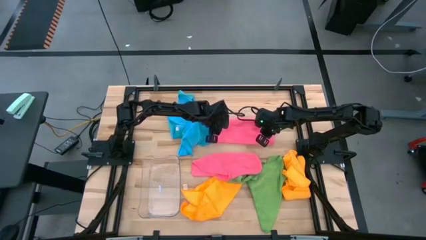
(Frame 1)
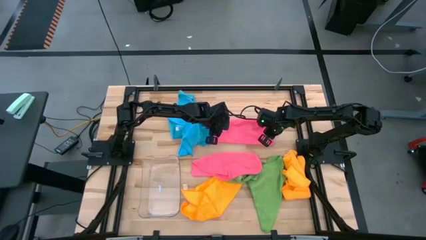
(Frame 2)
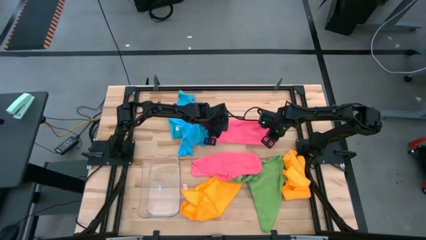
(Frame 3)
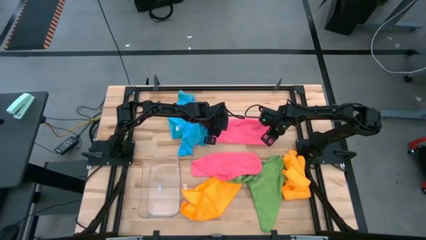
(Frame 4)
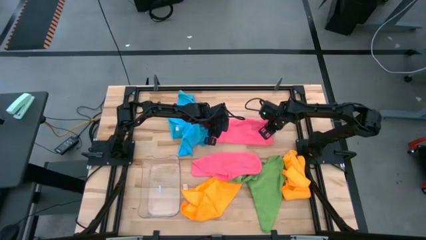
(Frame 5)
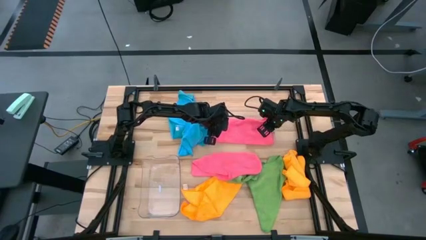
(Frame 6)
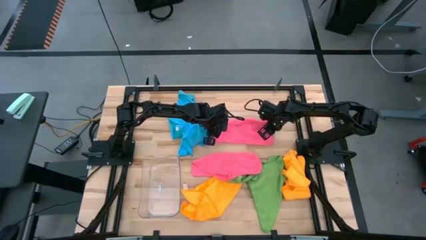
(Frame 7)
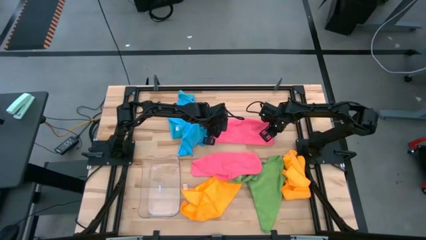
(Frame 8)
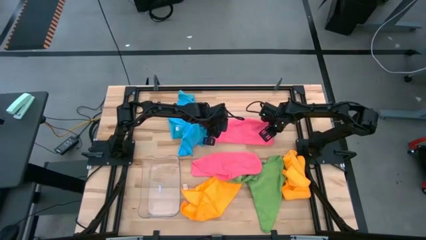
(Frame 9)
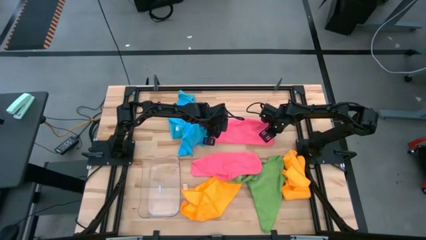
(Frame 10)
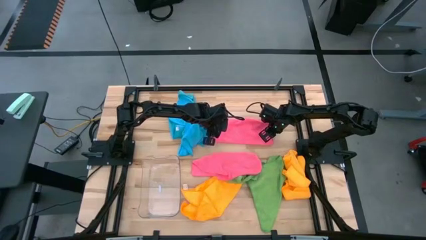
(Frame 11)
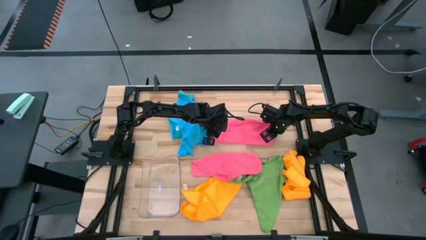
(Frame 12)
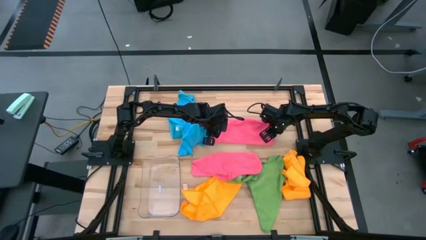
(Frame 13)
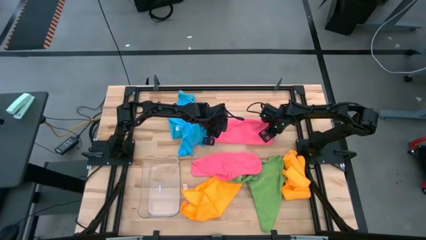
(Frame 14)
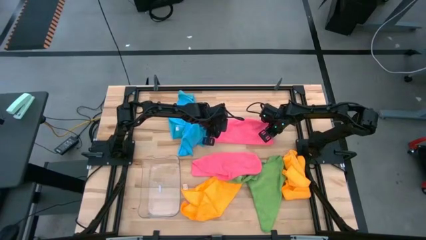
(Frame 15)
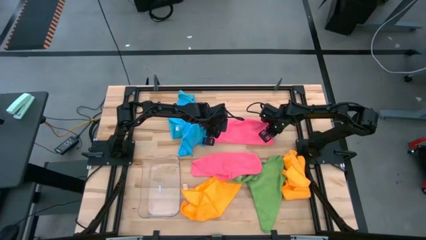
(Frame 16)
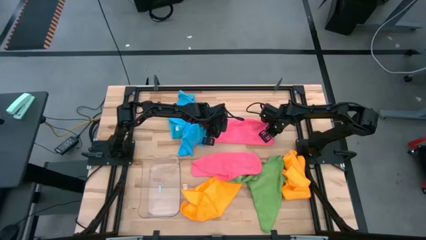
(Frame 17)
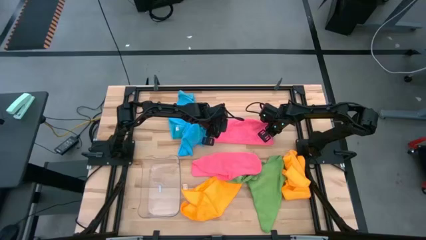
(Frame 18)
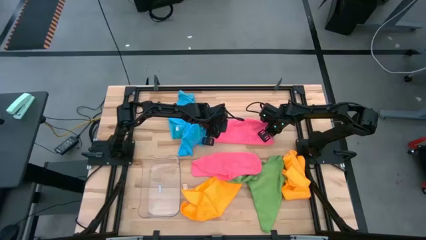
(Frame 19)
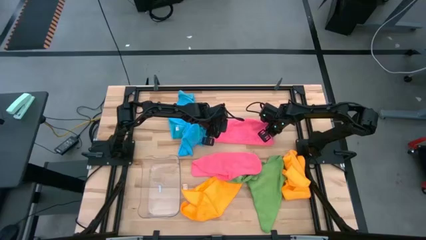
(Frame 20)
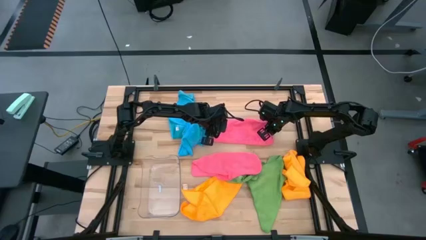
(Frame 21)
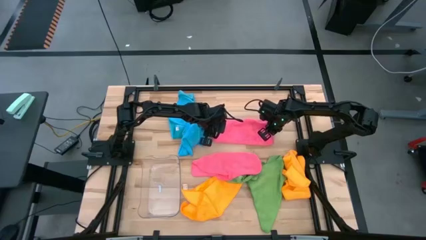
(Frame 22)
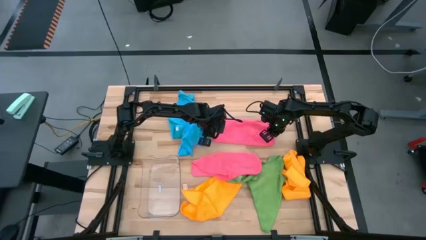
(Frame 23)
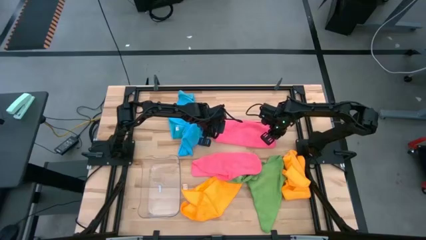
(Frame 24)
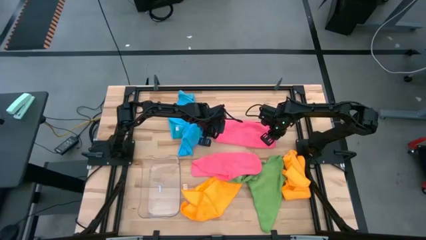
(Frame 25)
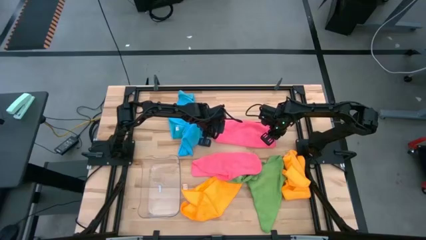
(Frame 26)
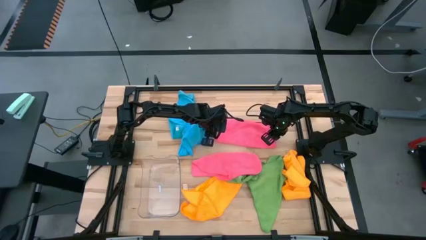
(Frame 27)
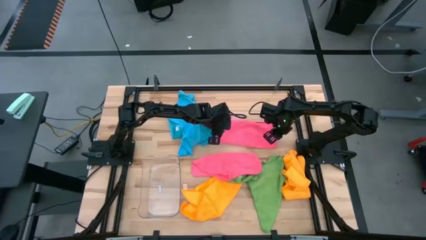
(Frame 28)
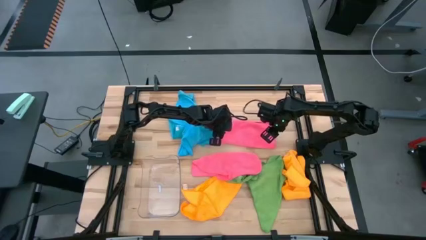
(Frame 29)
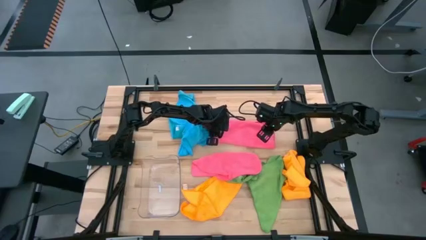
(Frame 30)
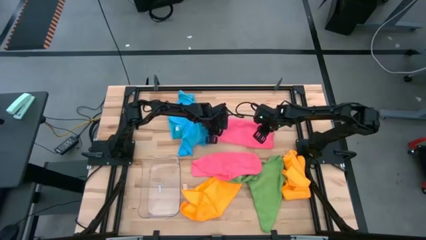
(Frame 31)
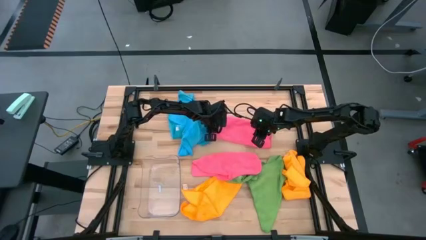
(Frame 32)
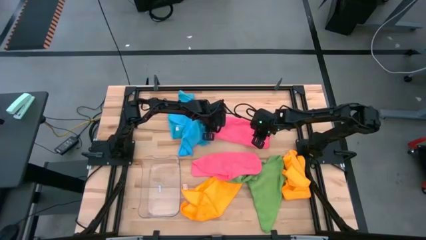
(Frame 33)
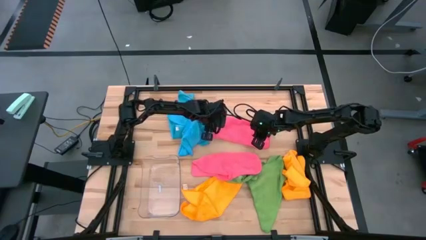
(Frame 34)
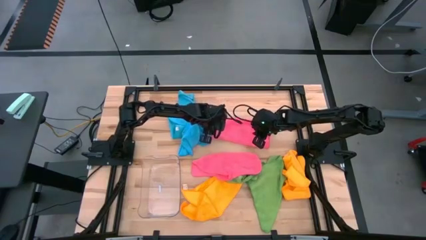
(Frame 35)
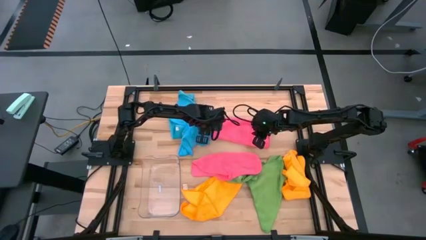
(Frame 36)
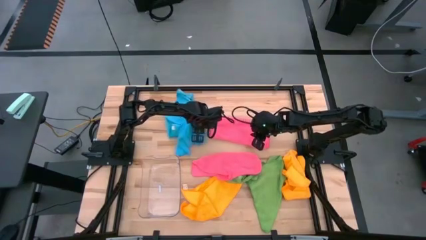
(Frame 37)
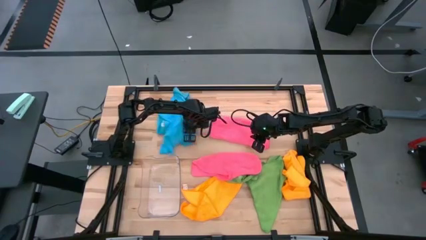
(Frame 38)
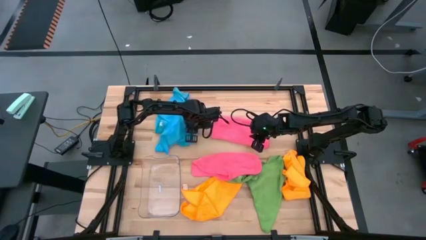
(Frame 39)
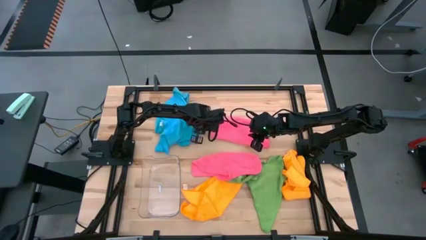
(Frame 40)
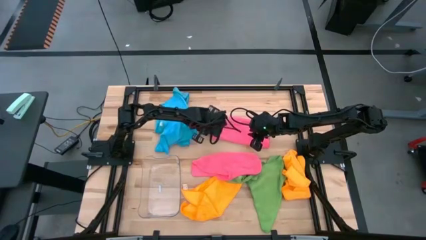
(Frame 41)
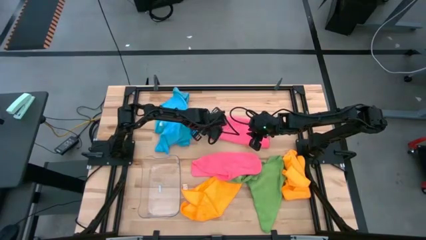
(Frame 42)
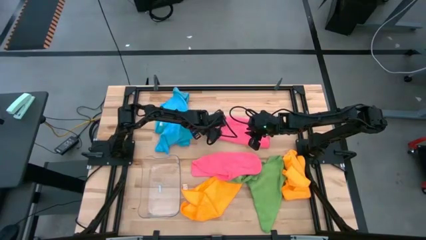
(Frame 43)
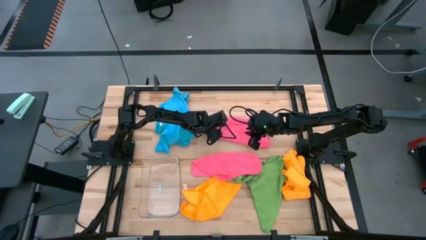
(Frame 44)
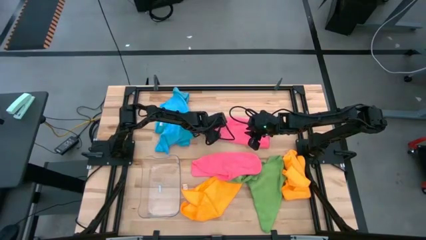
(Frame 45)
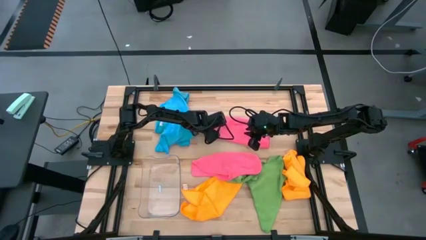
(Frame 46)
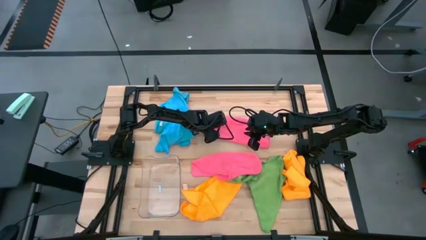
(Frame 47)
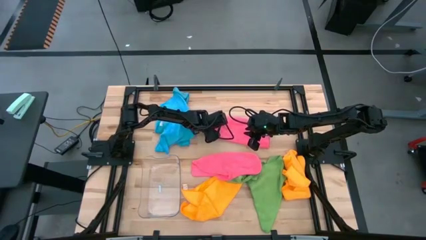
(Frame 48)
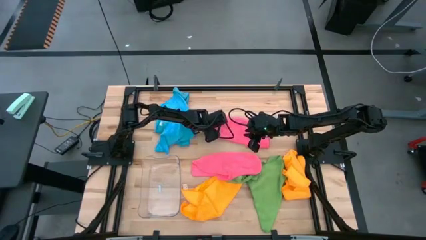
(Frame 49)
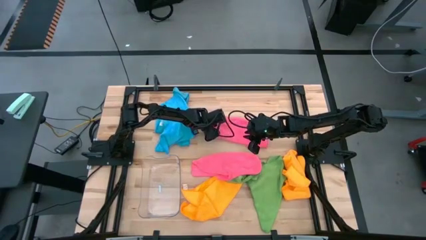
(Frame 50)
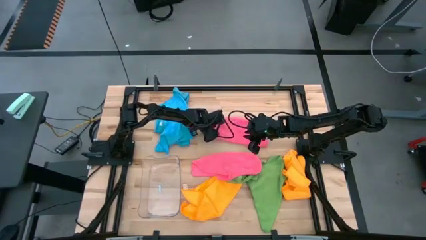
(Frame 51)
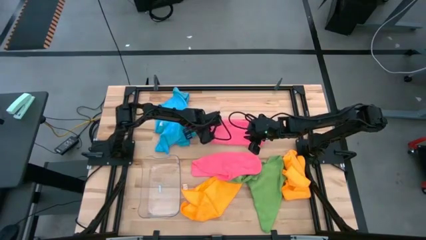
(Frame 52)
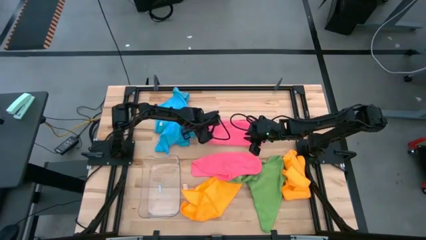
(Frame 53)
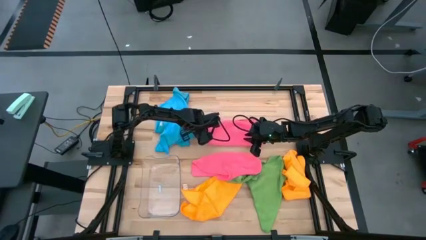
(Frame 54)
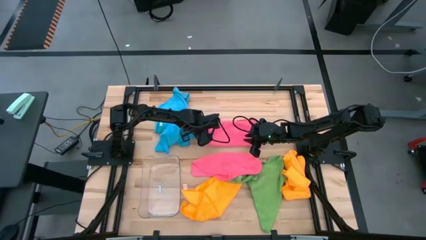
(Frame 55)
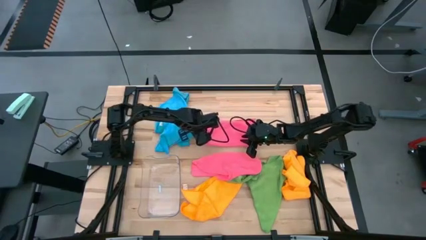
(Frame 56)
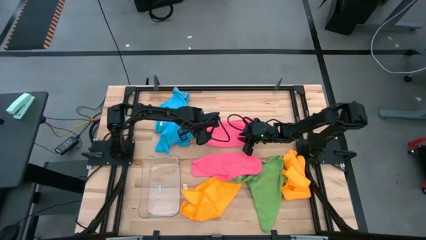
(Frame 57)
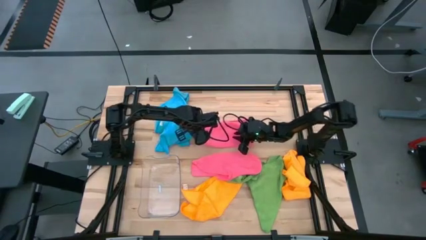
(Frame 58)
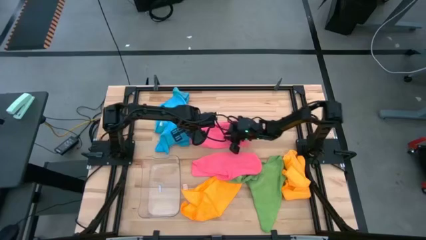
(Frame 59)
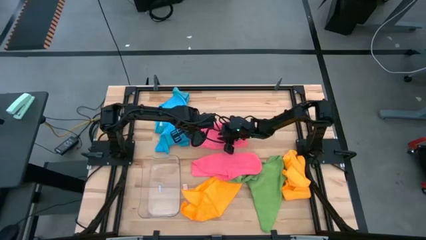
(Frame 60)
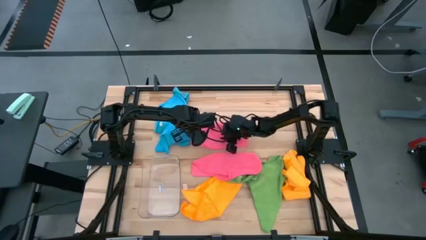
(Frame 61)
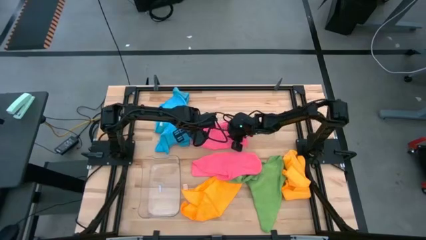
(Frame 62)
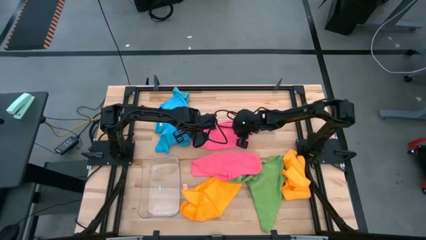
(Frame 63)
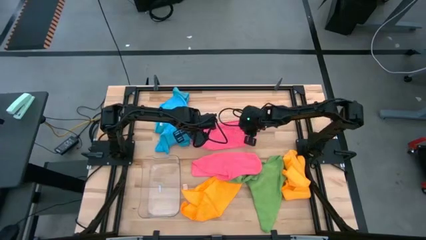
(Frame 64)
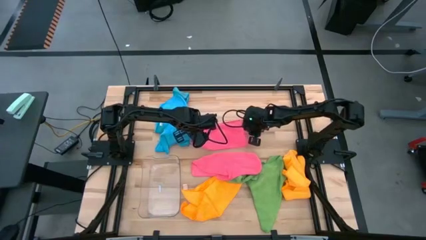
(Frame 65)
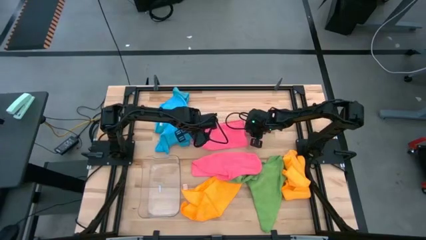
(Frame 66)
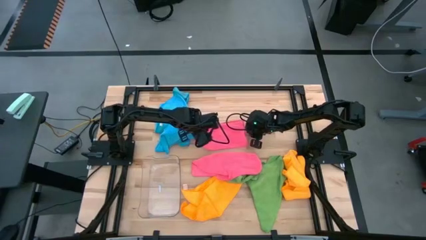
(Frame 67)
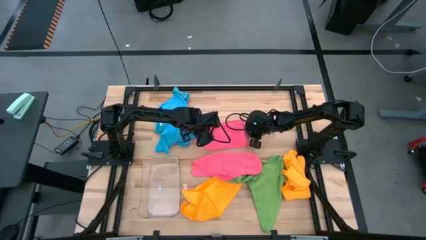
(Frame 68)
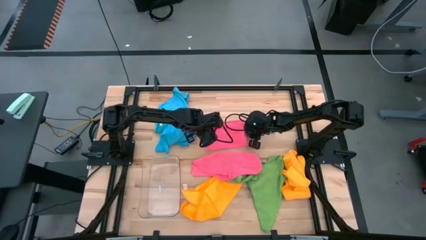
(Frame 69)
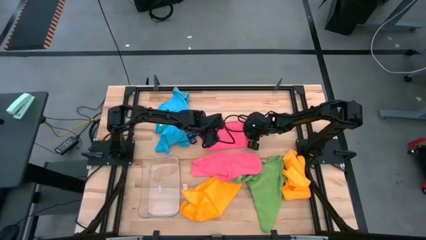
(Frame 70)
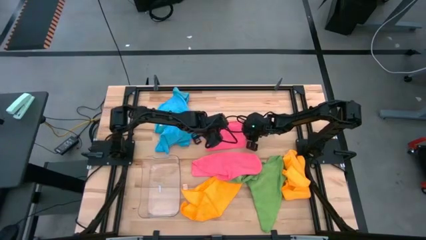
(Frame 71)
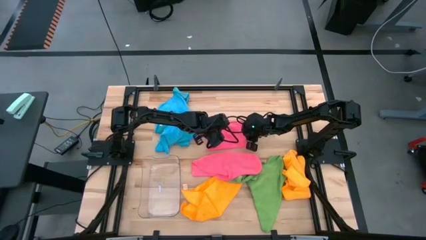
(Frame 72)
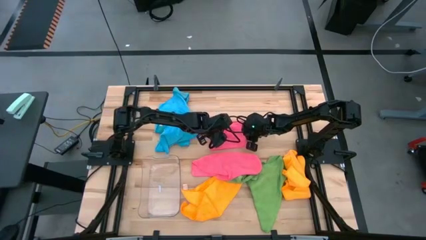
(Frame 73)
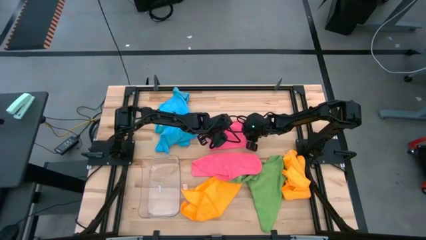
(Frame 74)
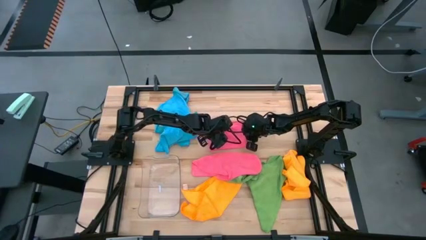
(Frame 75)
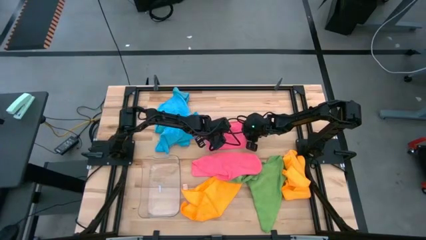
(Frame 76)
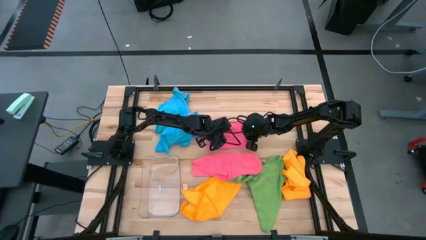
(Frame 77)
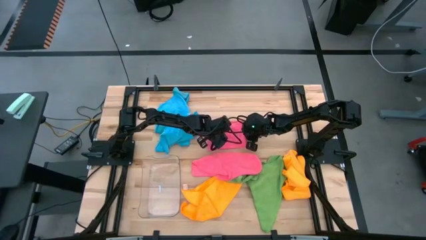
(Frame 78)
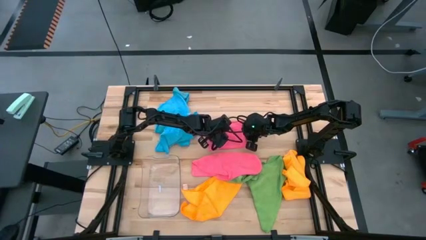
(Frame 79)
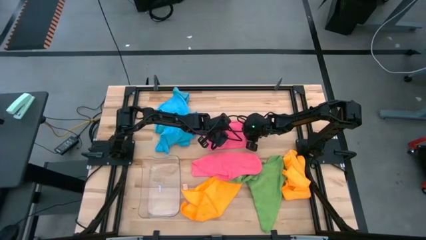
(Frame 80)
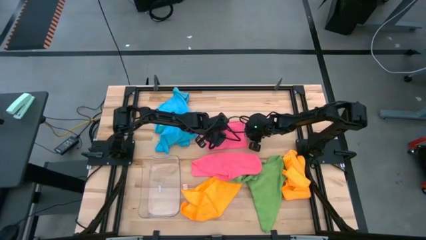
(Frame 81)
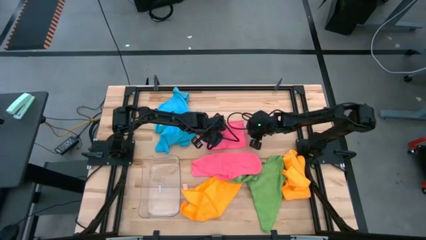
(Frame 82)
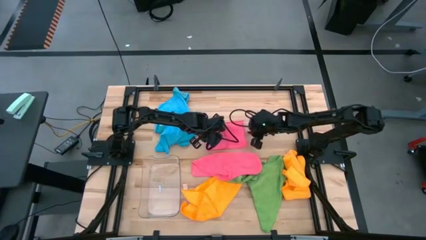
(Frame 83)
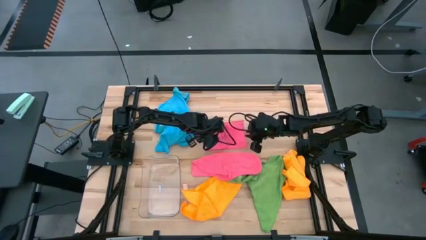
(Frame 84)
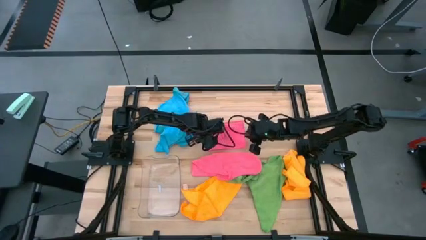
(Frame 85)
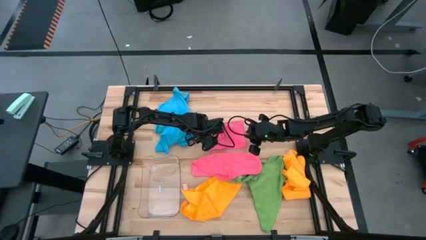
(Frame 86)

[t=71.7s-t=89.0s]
Task: Fold microfiber towels
Fold the top pink microfiber cloth
